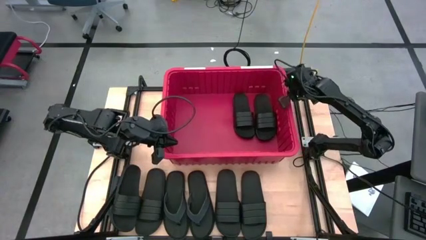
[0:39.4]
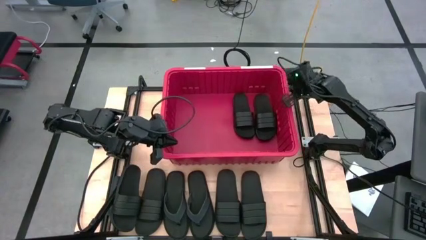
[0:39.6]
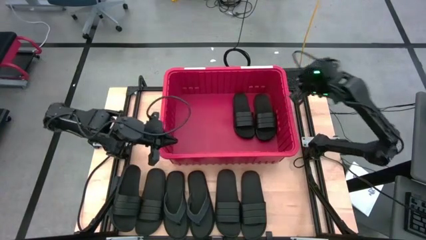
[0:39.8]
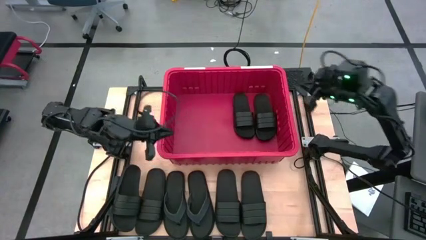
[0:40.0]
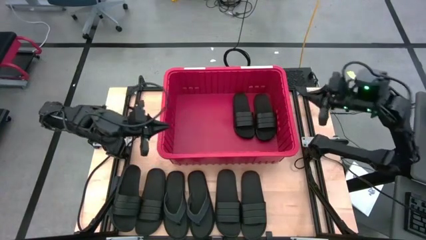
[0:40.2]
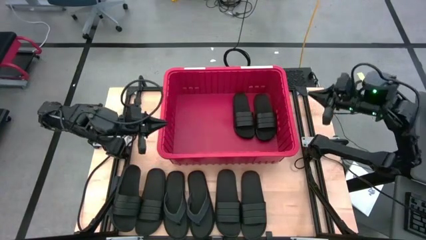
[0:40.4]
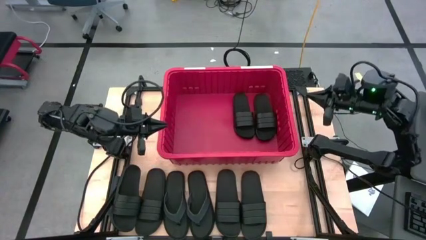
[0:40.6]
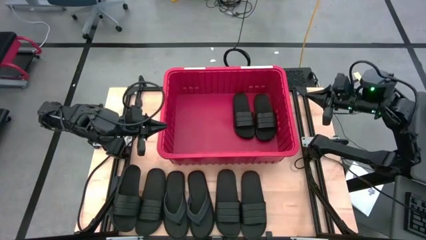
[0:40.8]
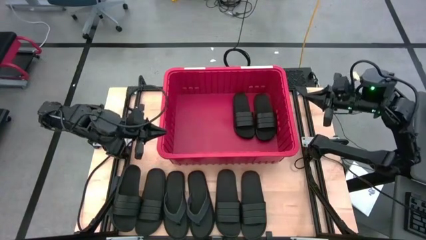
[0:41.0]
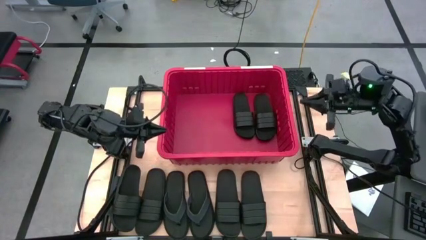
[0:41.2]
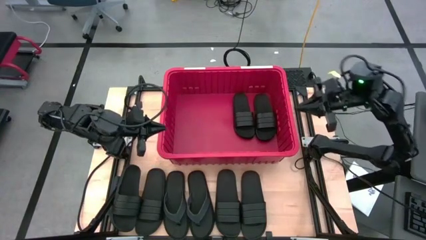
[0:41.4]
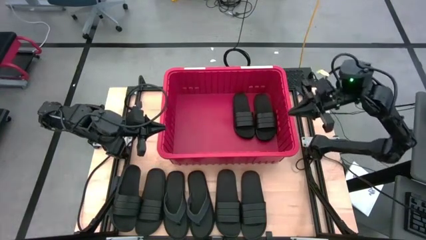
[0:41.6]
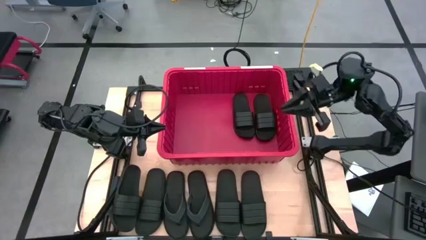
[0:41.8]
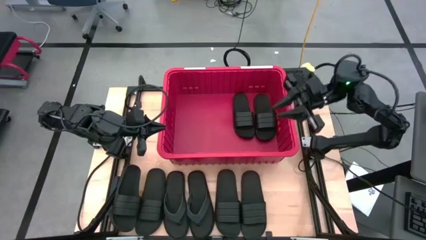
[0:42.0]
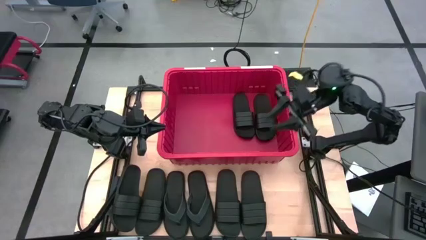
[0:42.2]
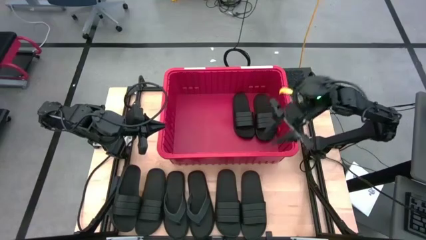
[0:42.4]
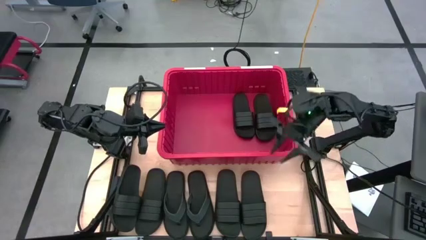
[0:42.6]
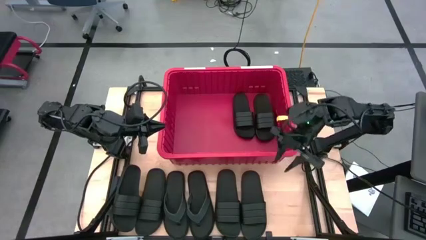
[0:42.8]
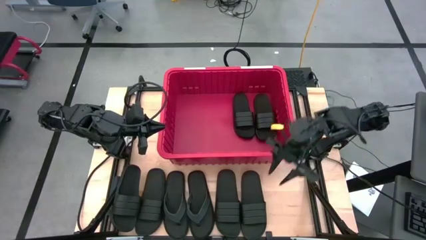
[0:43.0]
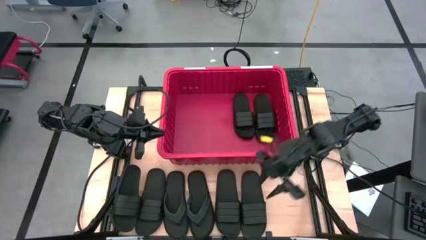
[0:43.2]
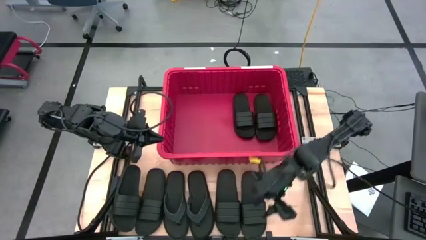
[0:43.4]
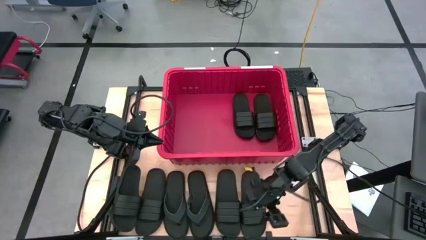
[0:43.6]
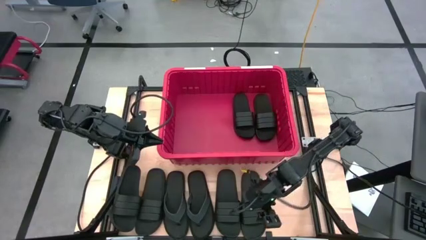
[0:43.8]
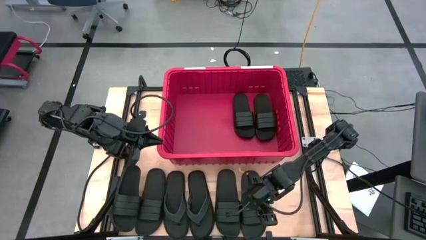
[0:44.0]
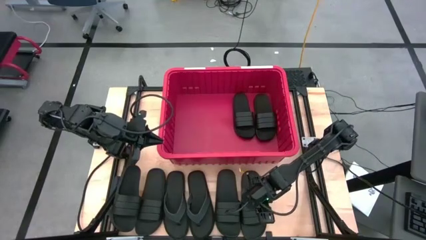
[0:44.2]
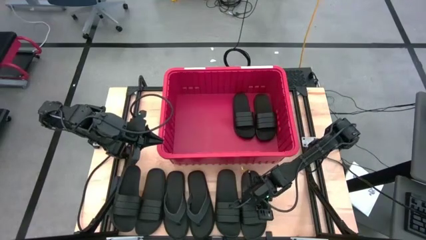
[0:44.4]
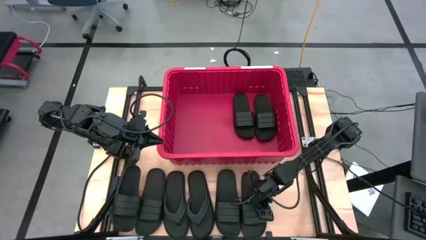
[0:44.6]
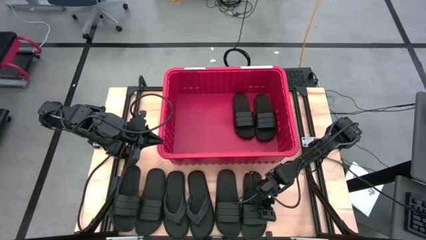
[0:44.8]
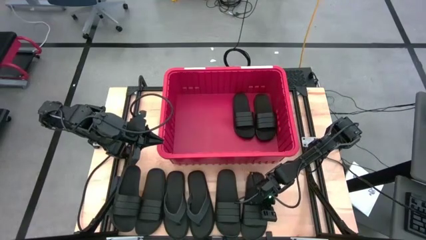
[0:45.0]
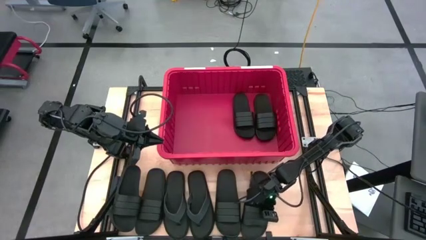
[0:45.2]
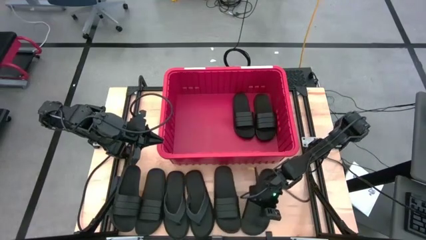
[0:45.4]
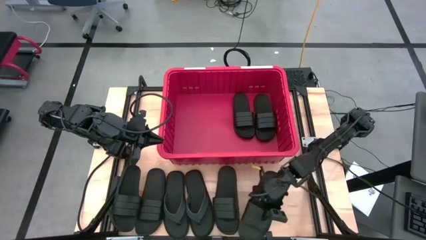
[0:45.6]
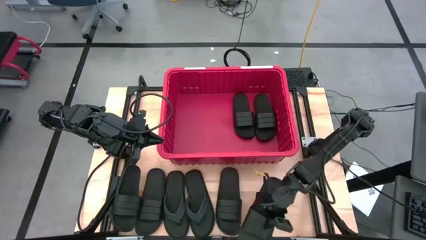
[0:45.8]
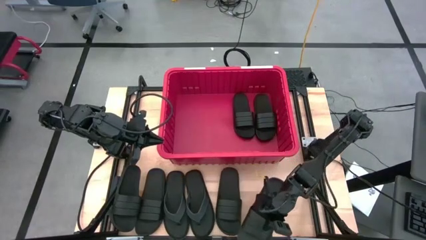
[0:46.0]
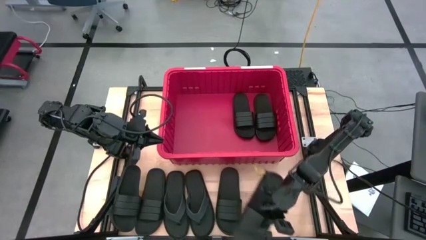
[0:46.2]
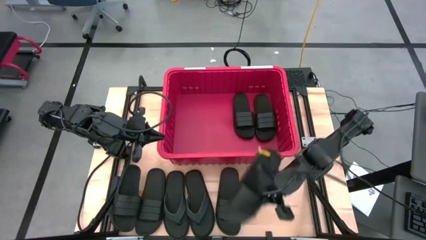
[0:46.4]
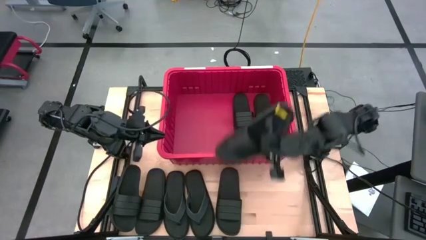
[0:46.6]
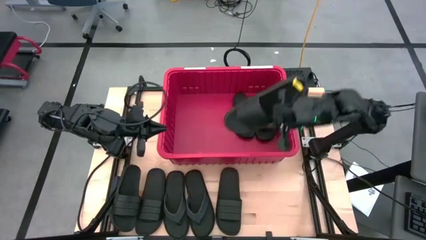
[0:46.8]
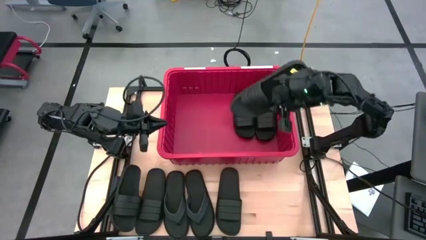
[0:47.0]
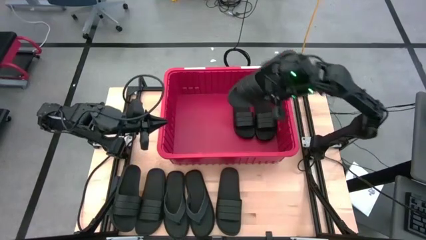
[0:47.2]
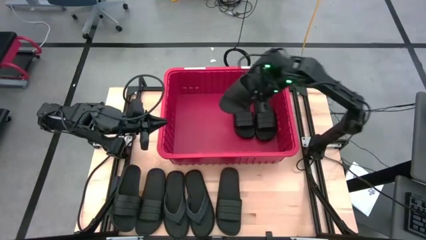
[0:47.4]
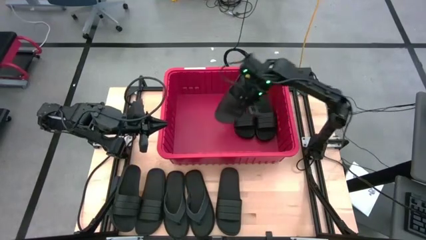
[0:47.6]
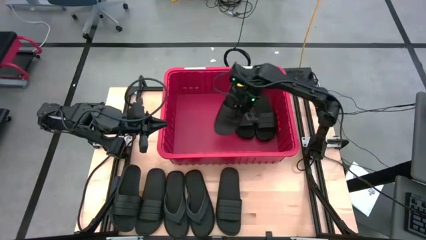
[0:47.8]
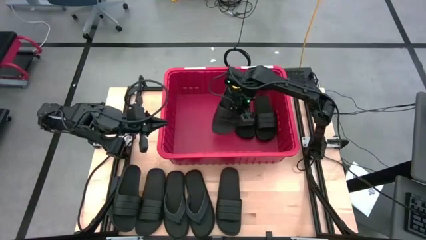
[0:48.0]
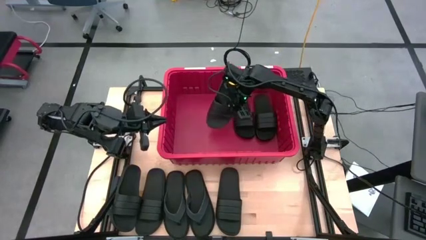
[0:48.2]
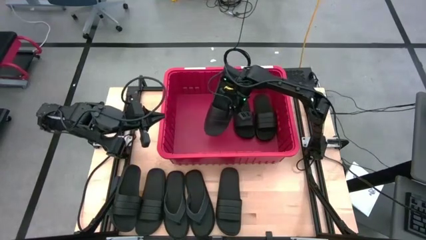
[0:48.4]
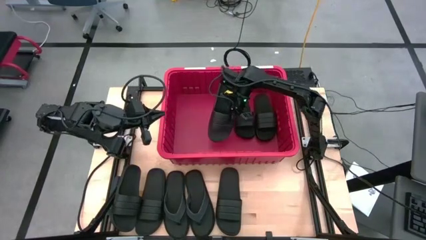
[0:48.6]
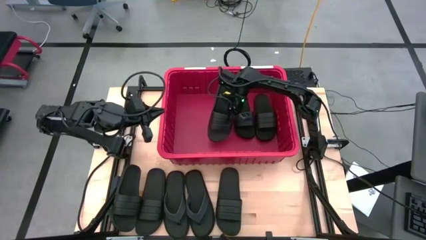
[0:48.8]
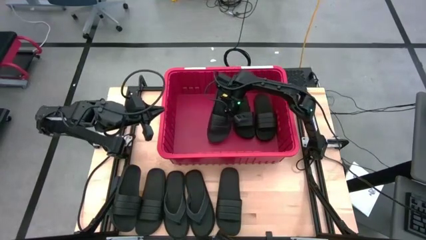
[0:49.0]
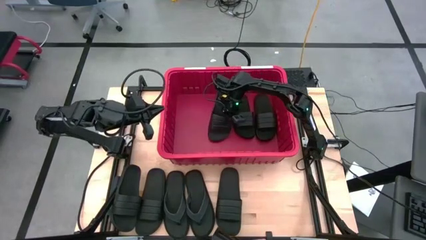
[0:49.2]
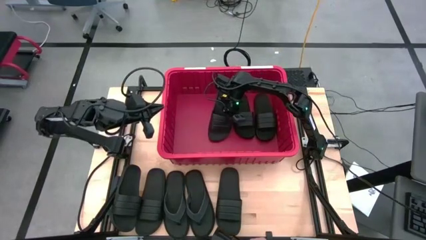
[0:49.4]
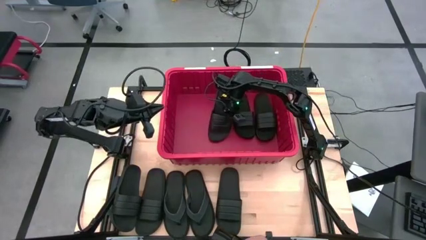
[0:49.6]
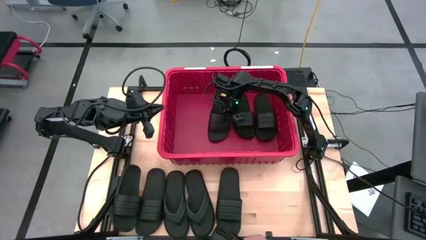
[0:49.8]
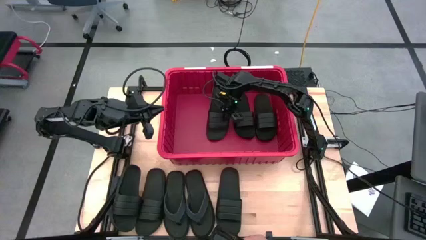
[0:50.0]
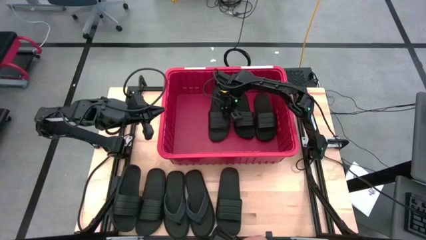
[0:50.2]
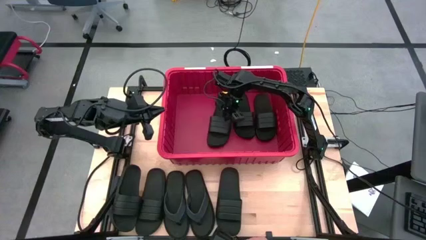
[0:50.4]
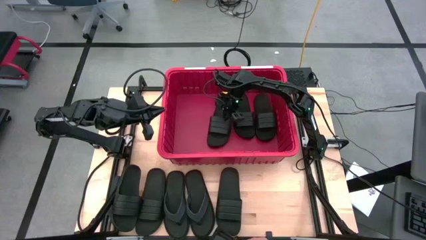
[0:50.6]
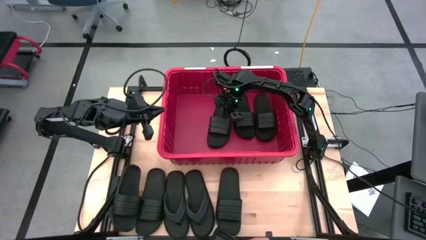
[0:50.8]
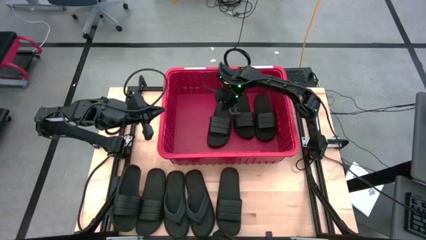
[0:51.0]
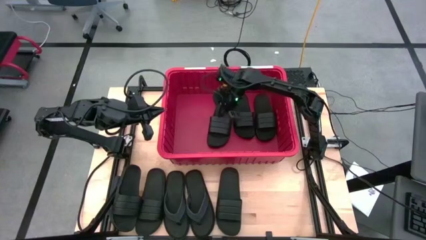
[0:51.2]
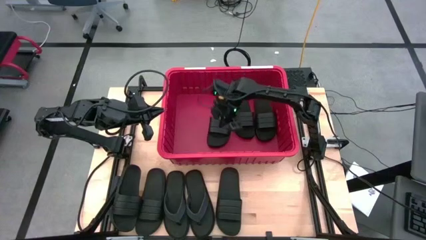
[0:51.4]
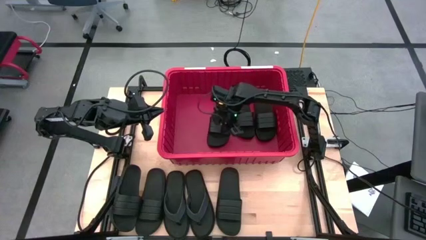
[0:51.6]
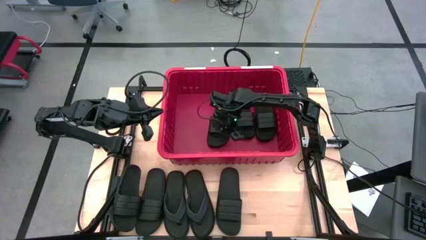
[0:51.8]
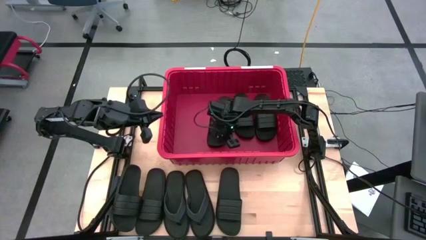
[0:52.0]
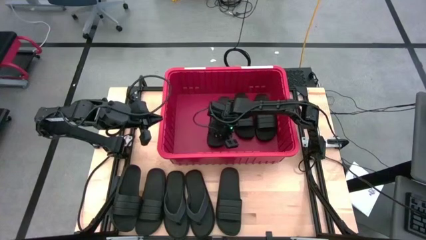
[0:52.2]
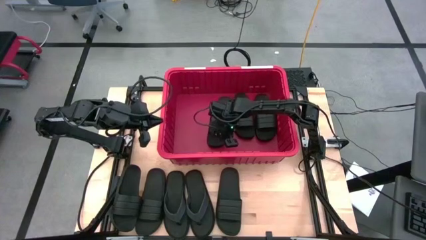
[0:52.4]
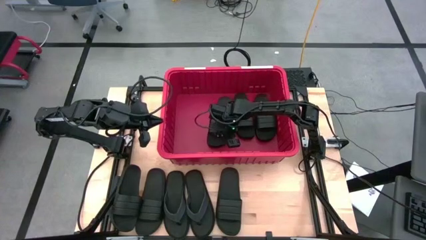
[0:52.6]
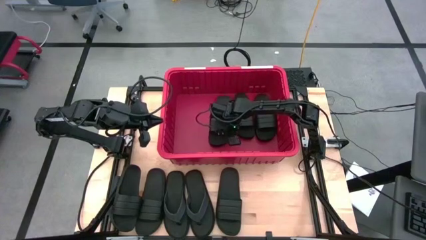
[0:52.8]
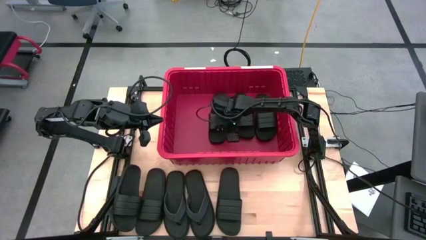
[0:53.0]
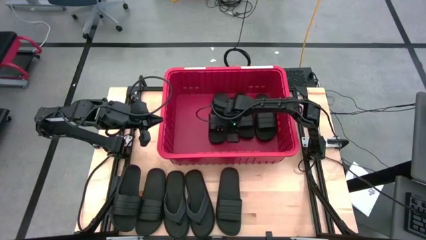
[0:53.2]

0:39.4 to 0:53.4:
Task: Pick and place slides into bin
Put the black slipper into the red bin

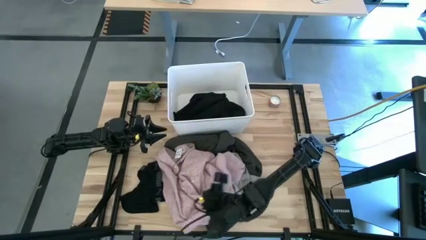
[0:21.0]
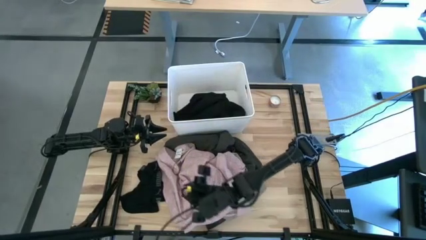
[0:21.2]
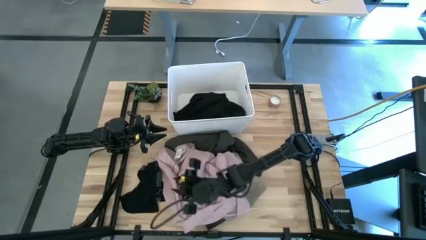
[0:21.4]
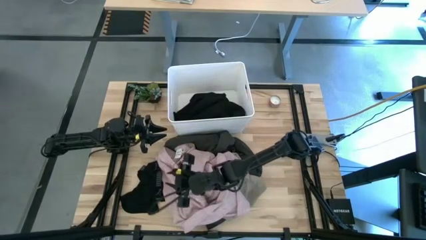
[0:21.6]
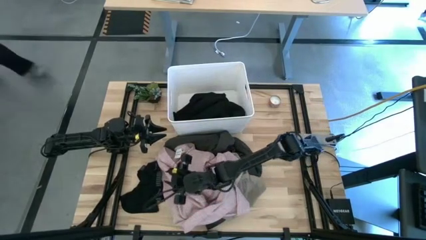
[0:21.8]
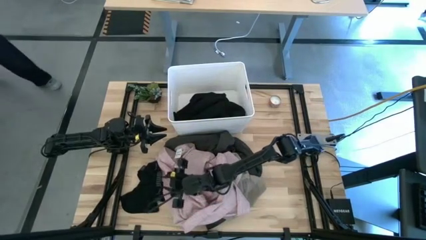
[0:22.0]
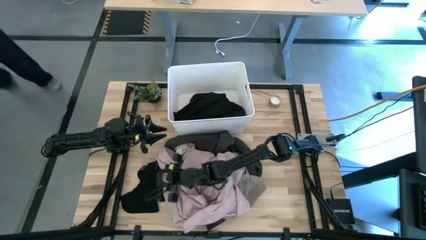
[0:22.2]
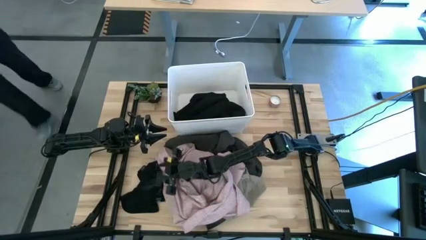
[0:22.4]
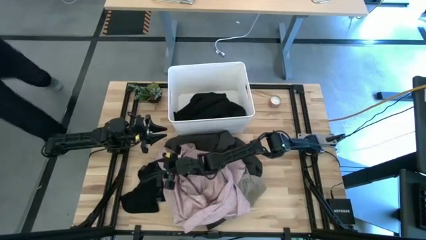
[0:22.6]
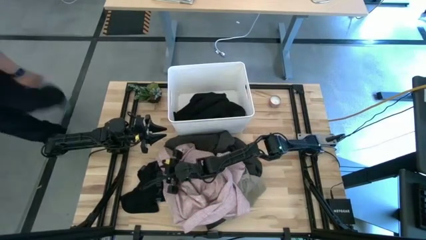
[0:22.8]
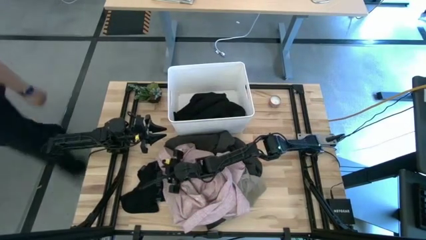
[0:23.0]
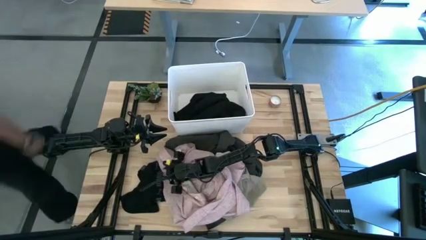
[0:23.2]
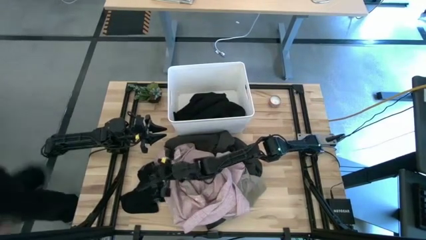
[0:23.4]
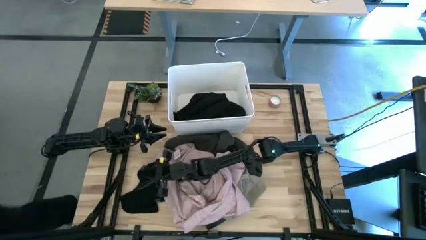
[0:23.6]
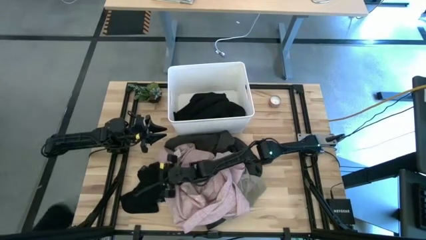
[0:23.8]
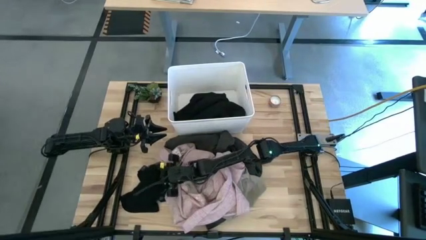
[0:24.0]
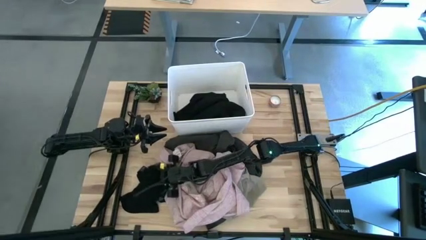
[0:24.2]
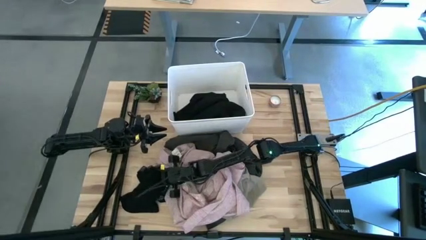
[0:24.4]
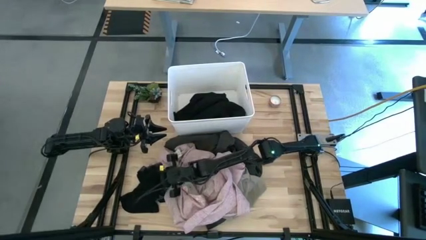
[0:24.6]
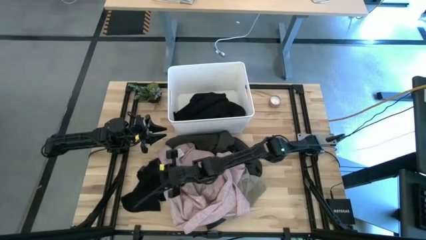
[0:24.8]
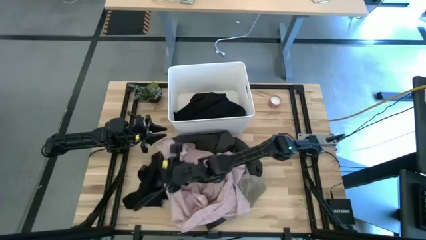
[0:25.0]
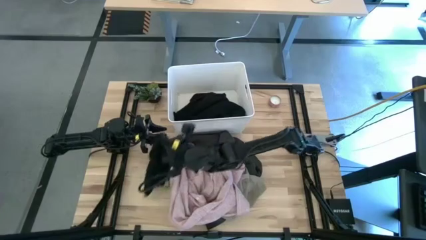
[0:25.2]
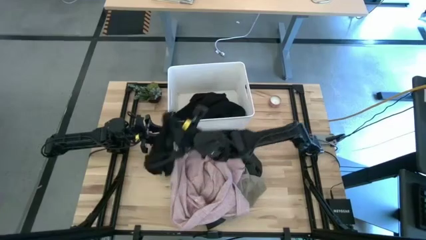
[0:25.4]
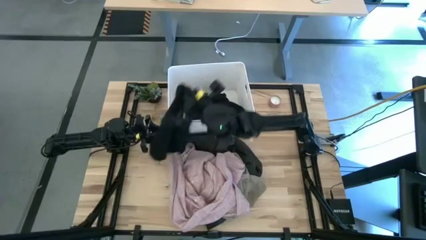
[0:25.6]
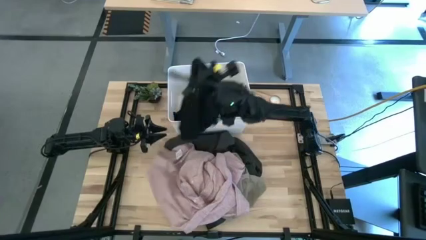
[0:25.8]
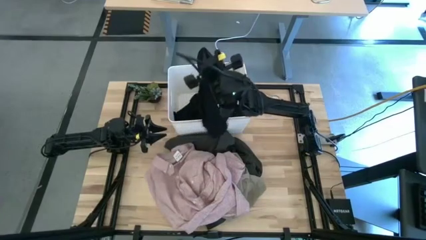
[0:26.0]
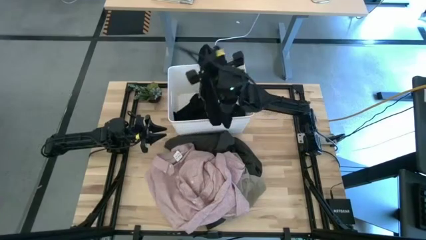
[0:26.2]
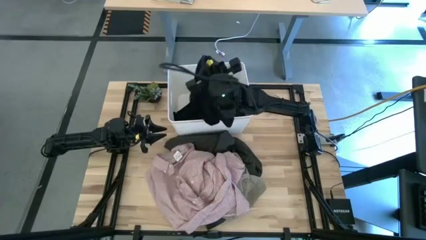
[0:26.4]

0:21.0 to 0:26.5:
Task: Sort clothes
Put the black underwear into the white bin
